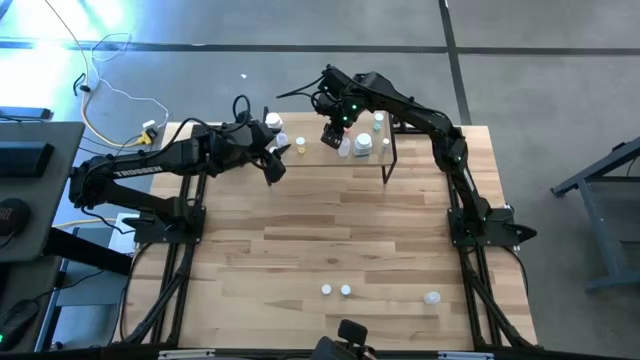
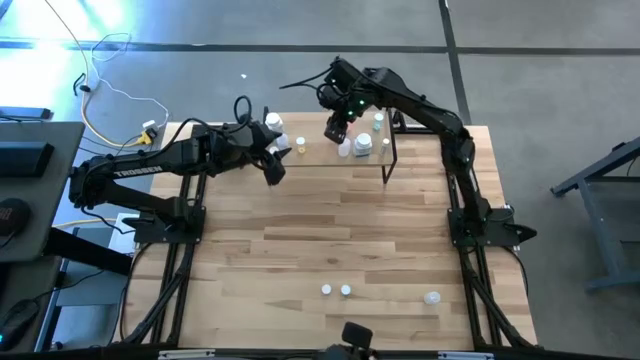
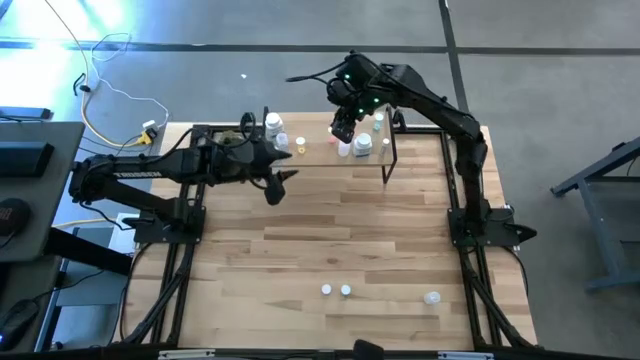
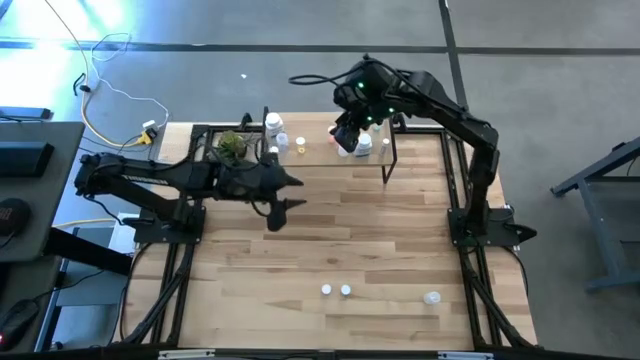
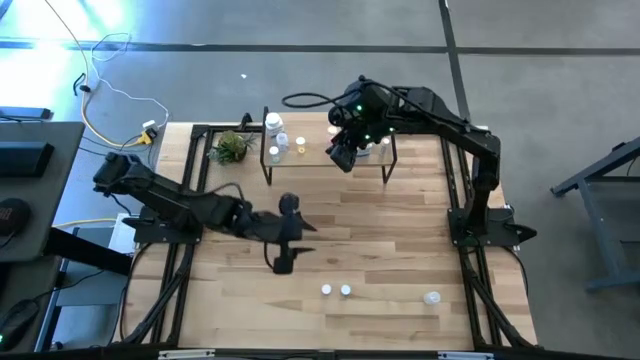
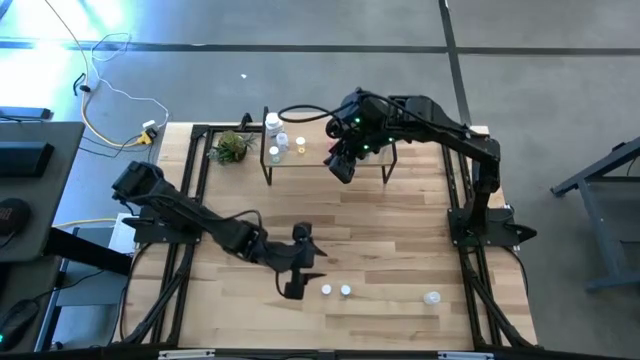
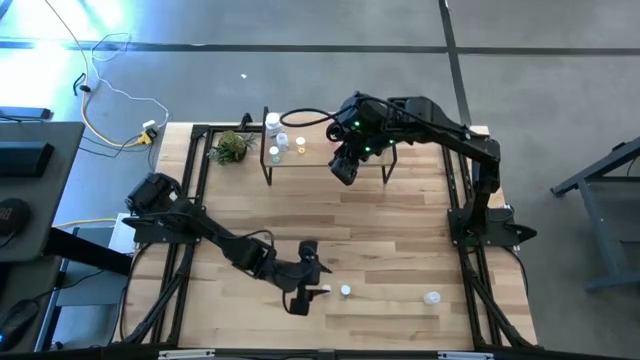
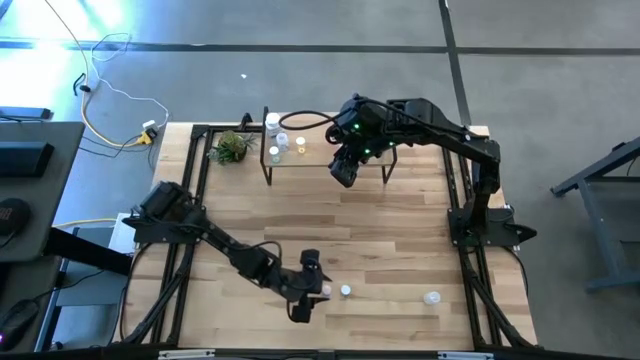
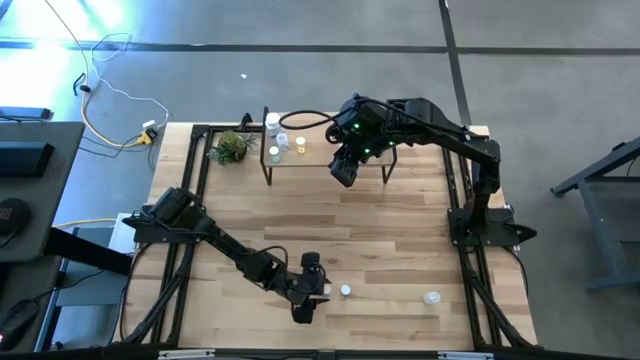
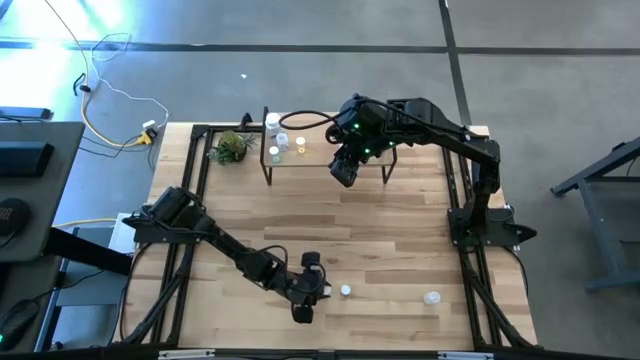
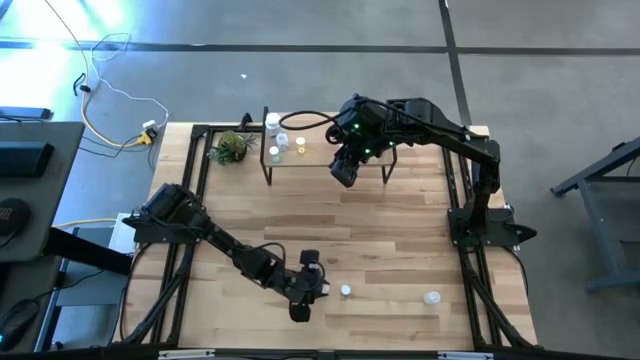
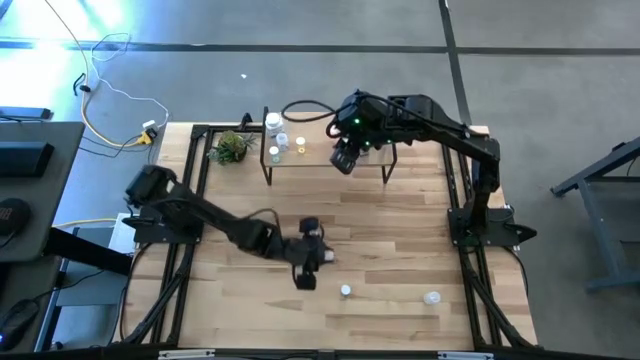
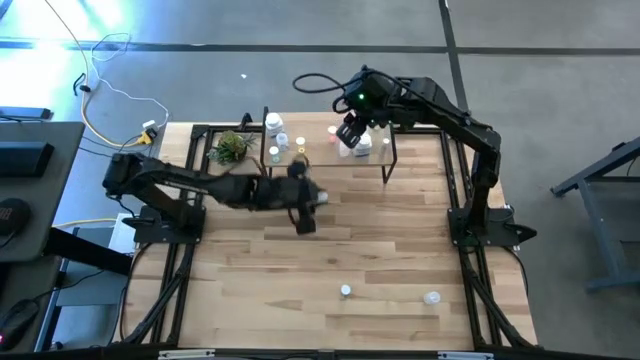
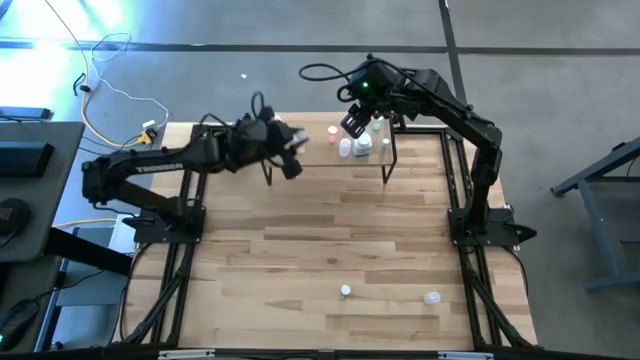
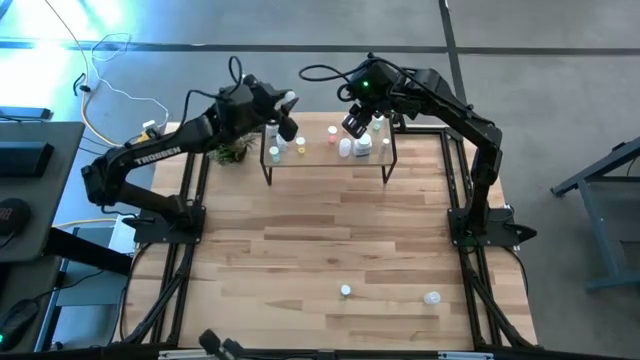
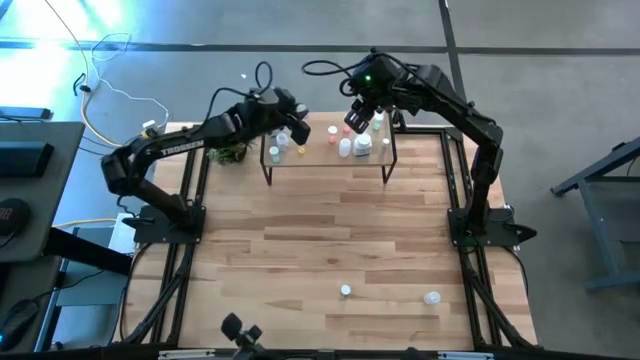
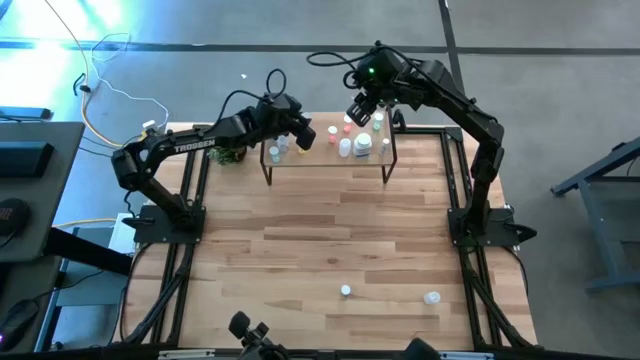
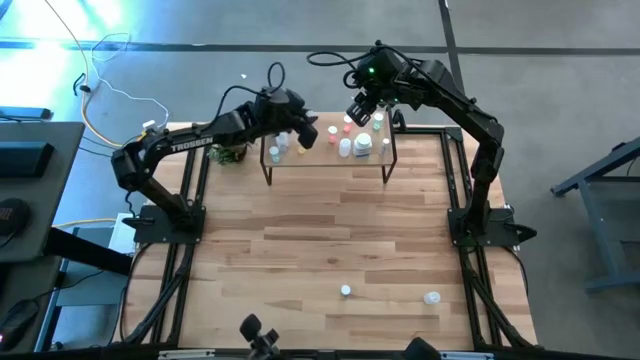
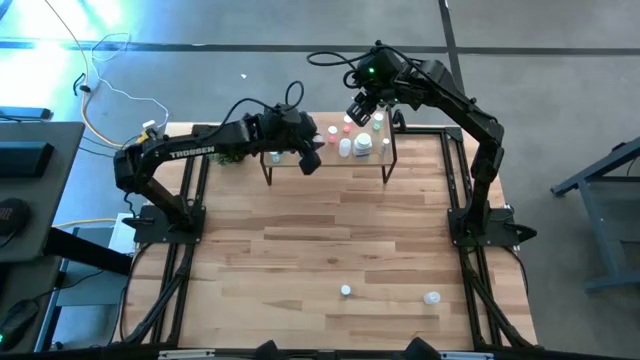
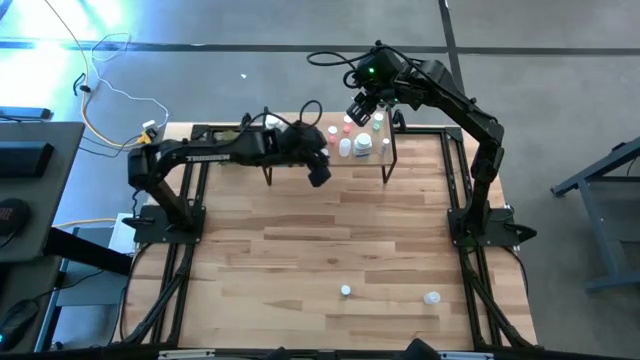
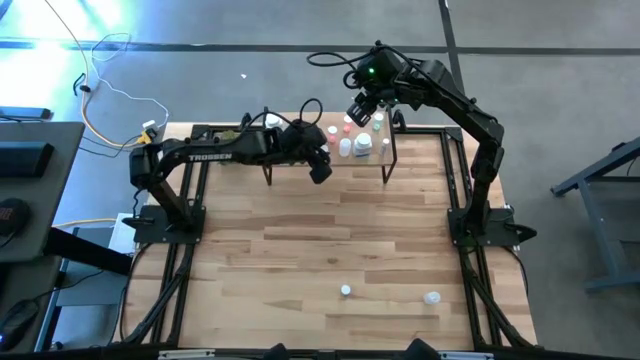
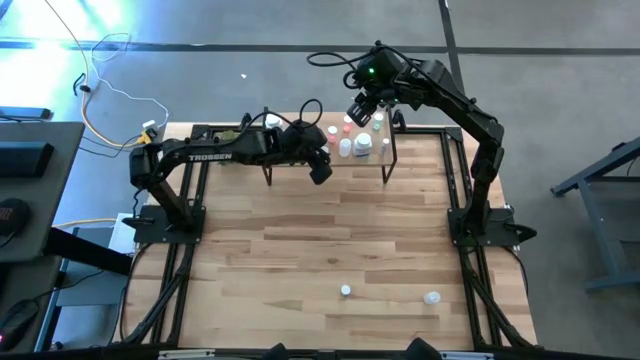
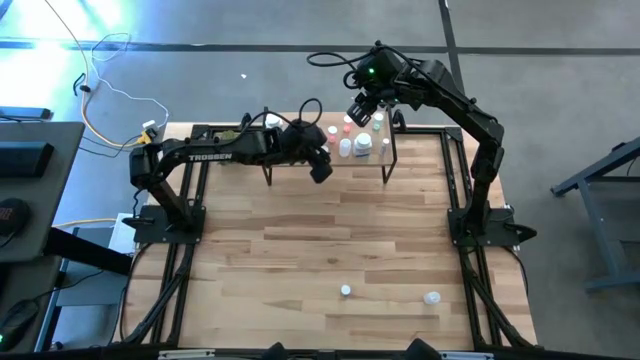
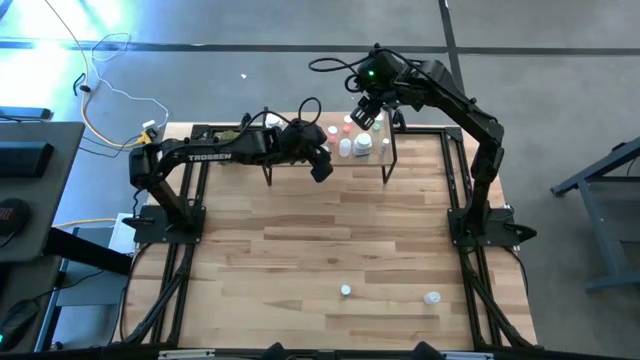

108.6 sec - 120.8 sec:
Task: Pick and place medicine bottles onto shelf by color
Put the purple pill bottle on the shelf

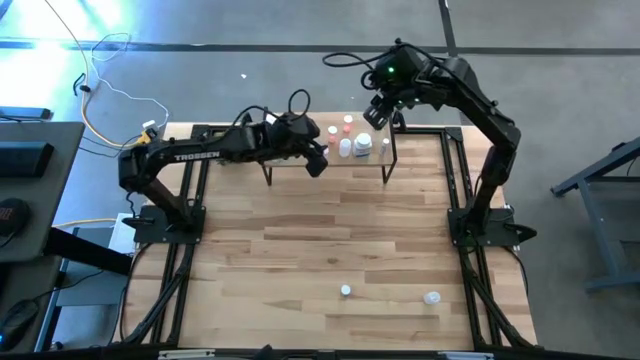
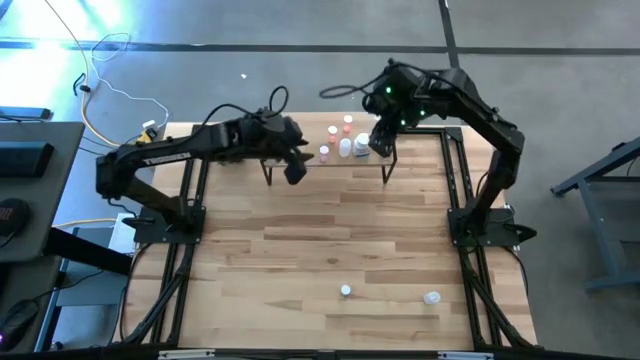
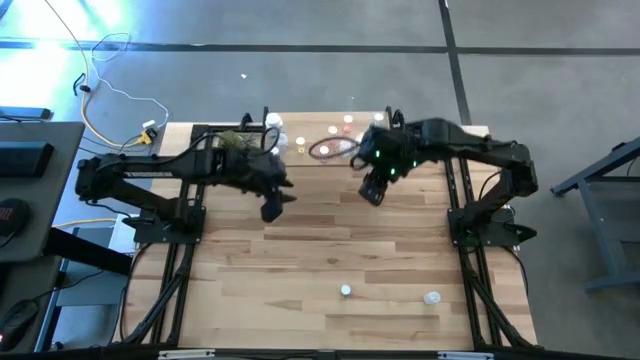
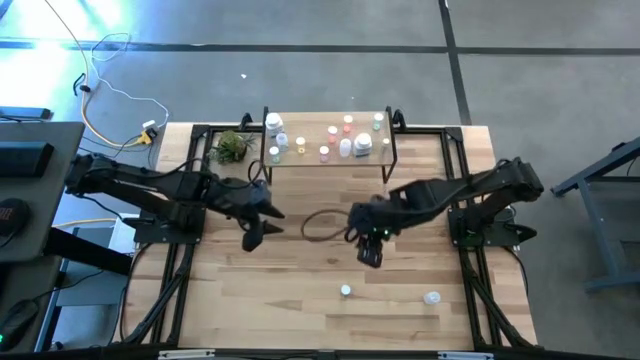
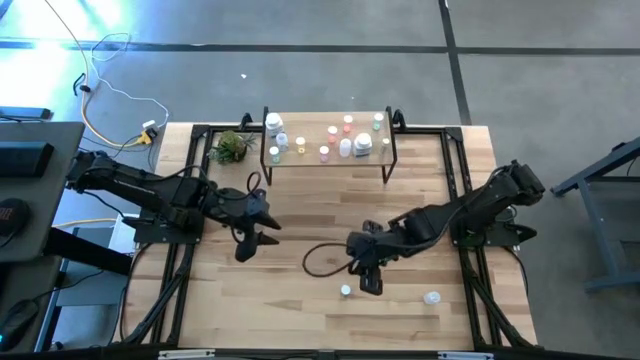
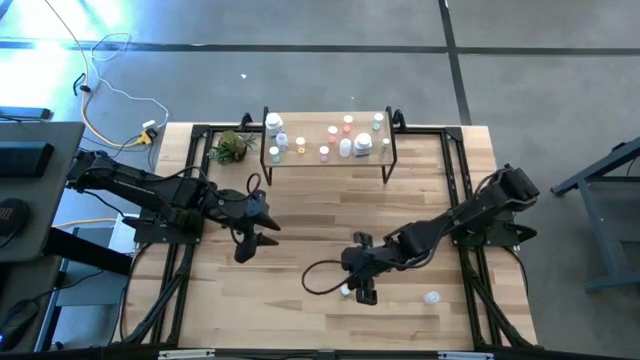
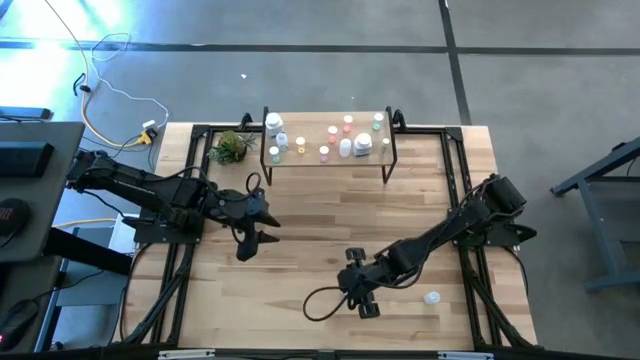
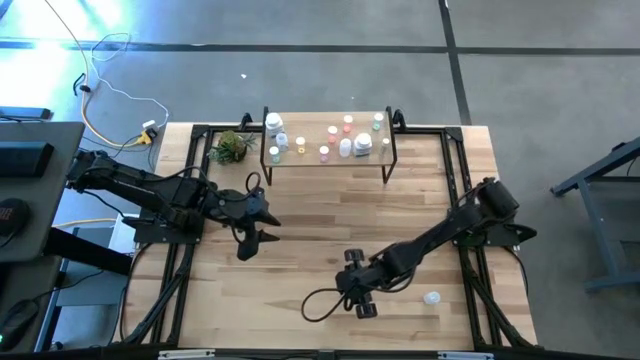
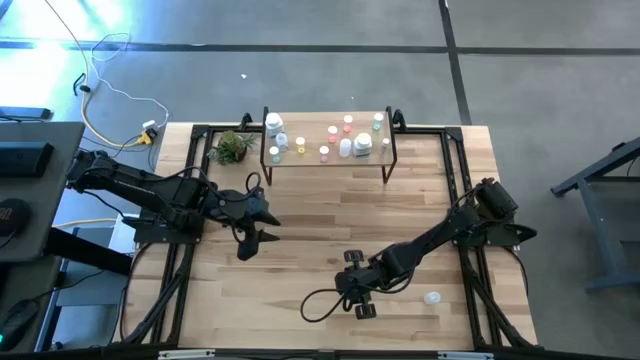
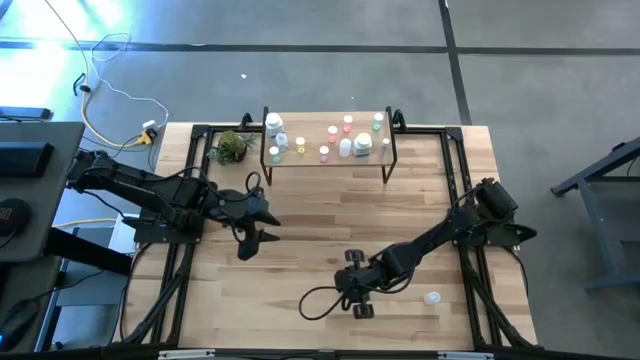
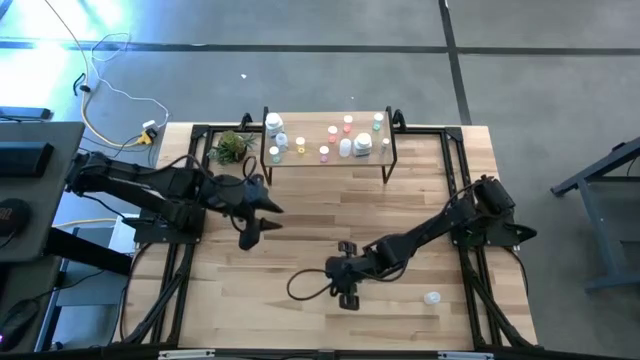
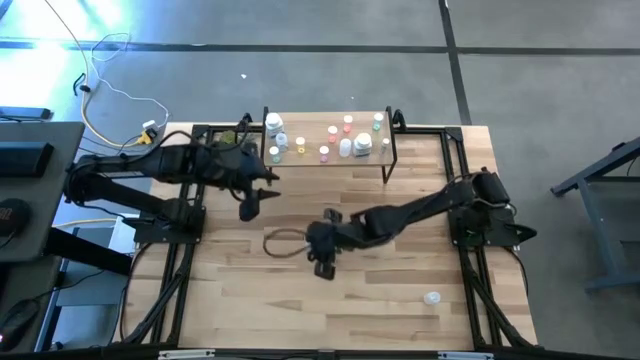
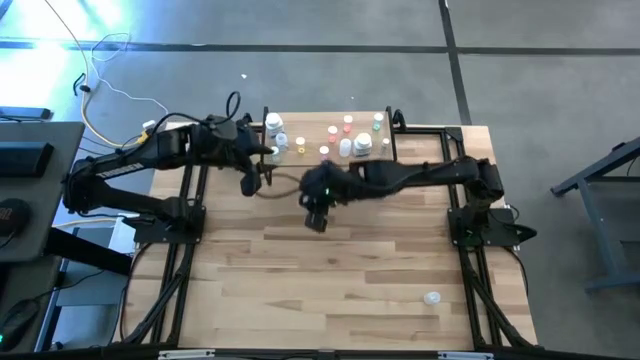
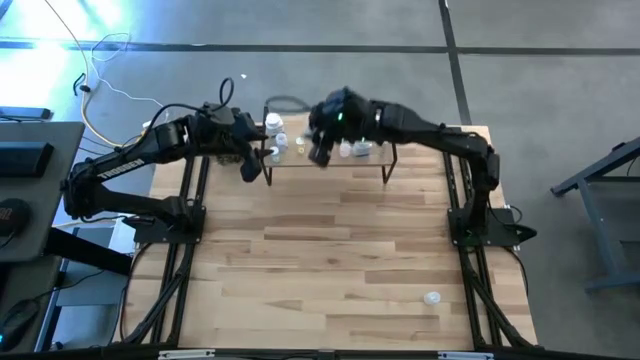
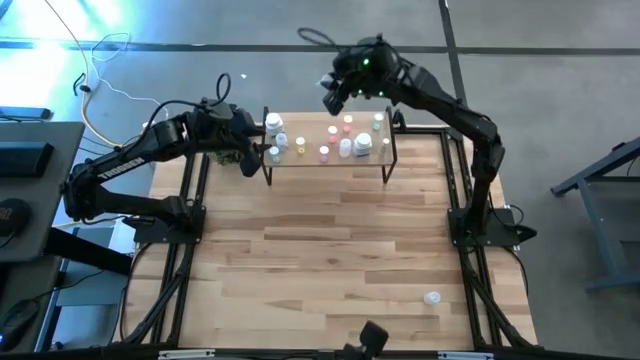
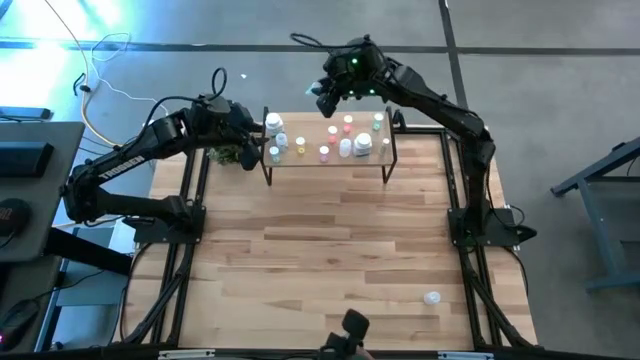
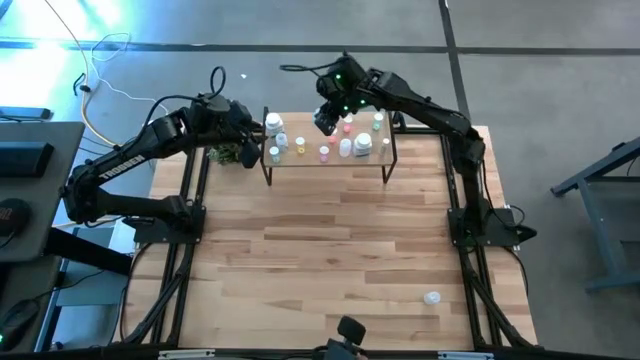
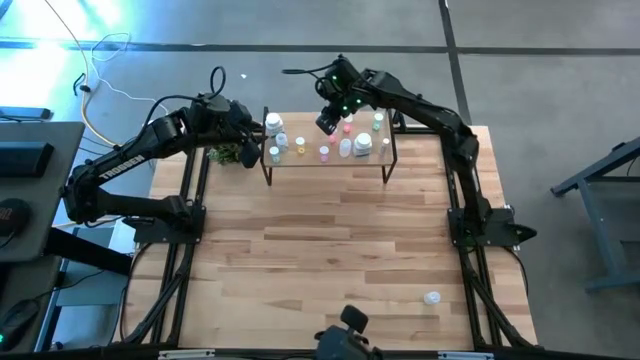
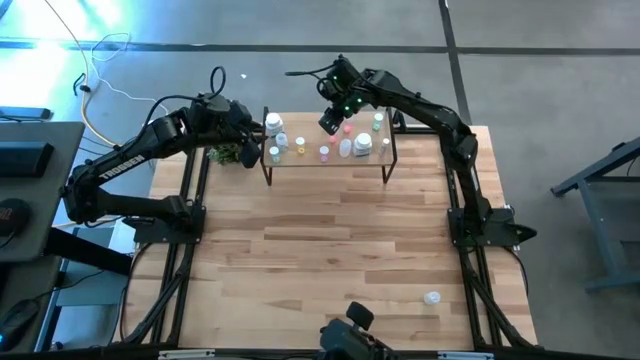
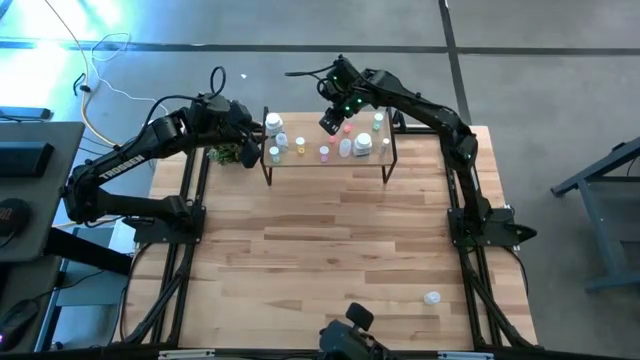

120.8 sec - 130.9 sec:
Put the blue pill bottle on the shelf
